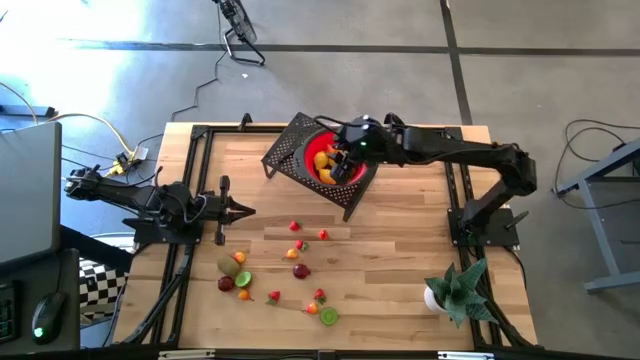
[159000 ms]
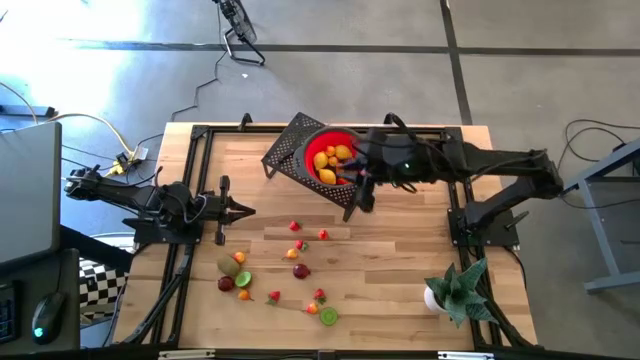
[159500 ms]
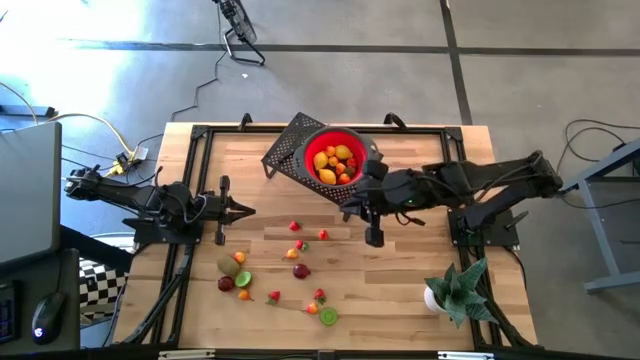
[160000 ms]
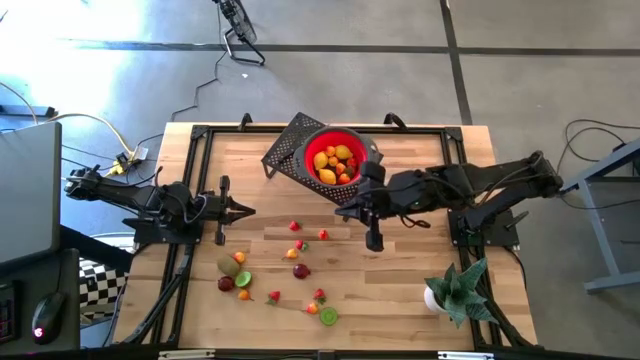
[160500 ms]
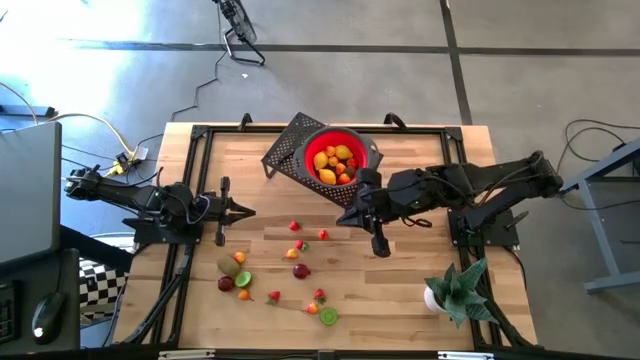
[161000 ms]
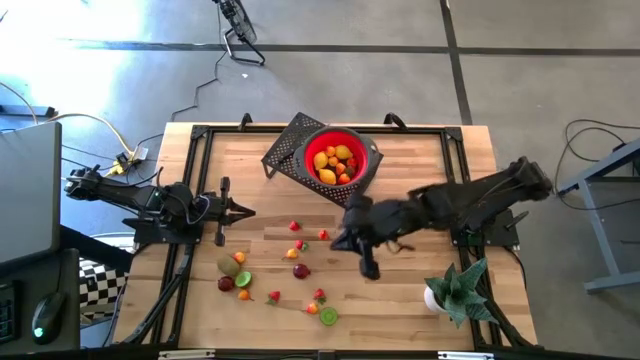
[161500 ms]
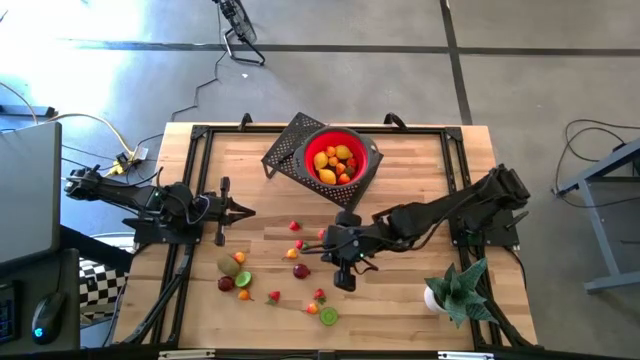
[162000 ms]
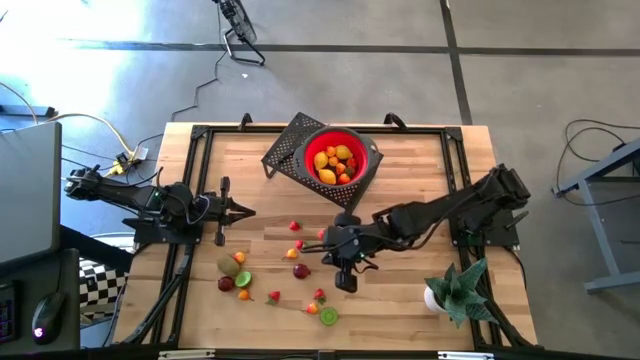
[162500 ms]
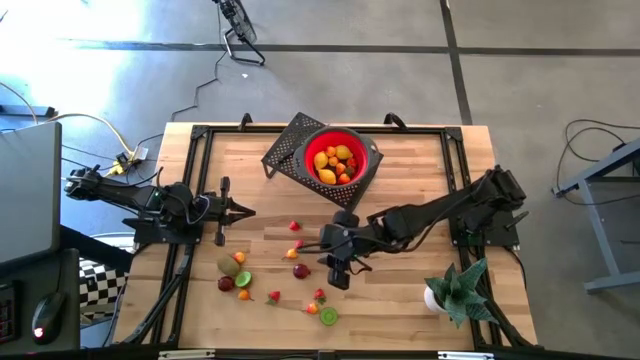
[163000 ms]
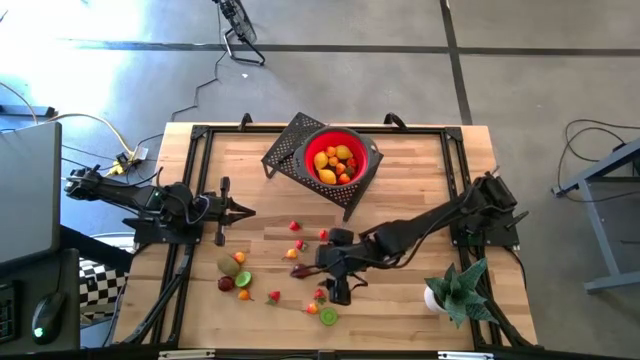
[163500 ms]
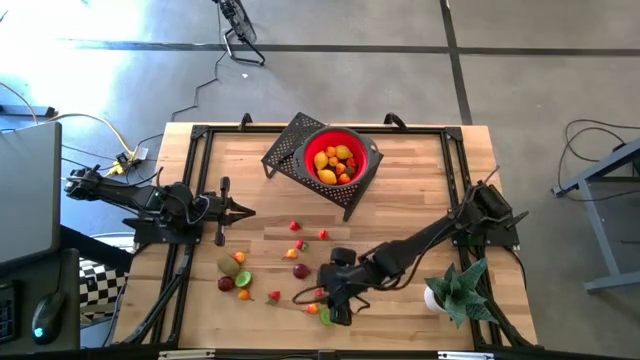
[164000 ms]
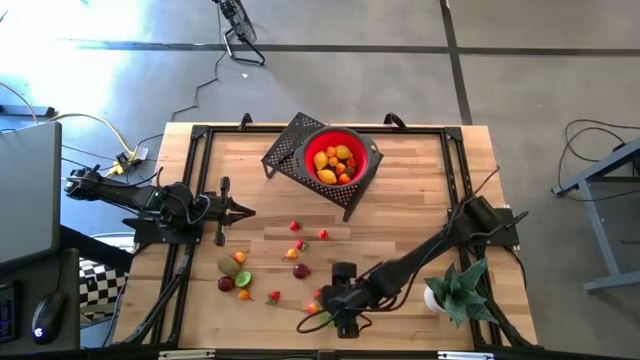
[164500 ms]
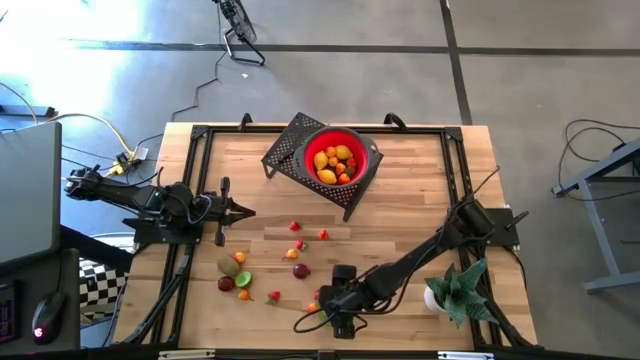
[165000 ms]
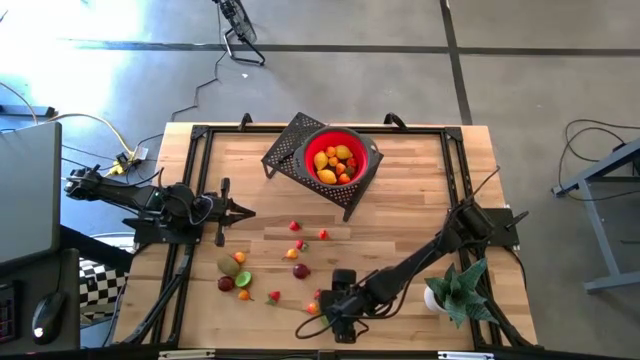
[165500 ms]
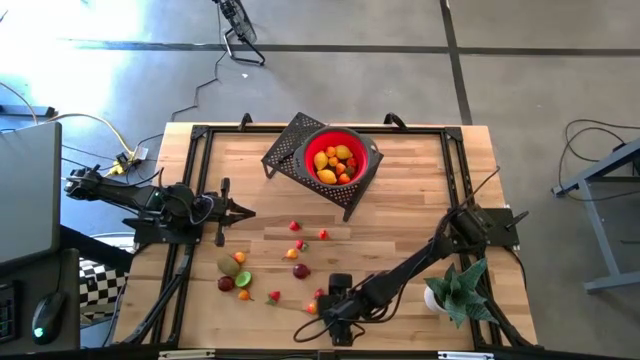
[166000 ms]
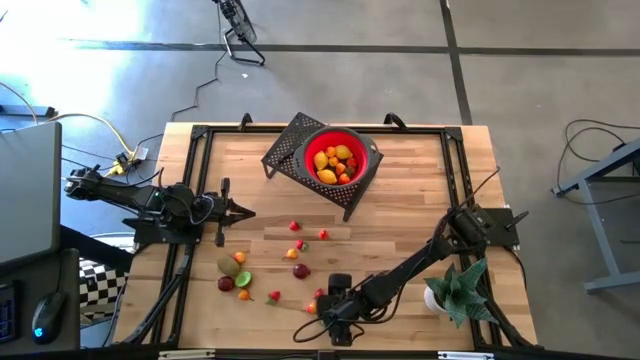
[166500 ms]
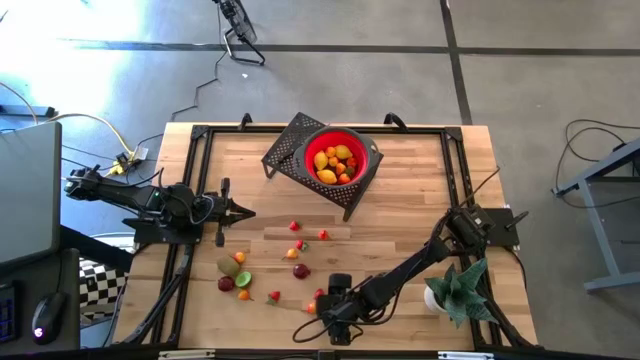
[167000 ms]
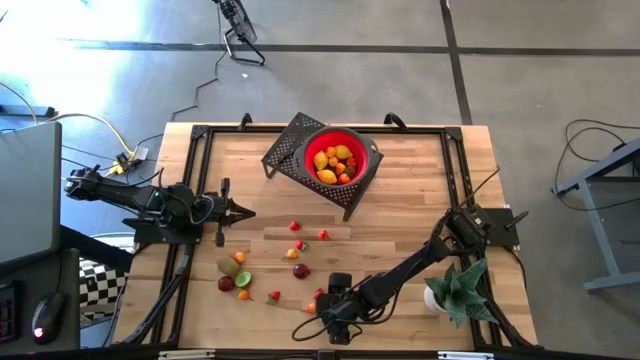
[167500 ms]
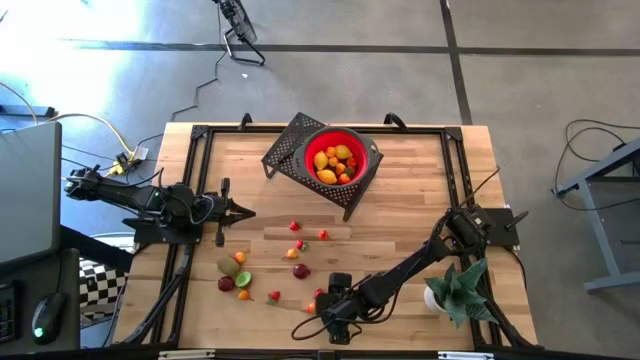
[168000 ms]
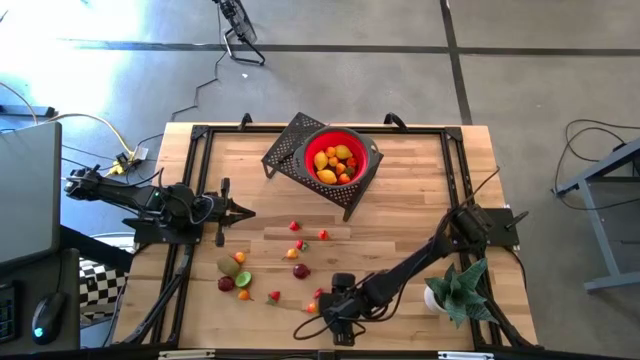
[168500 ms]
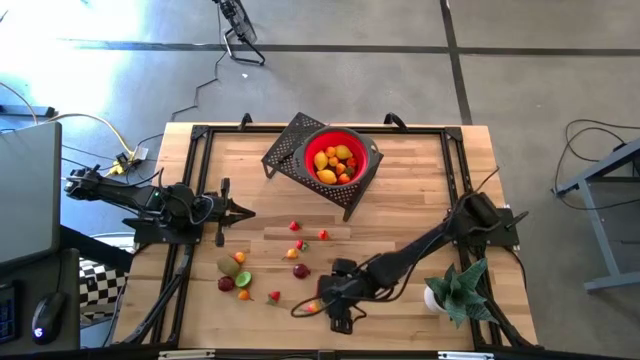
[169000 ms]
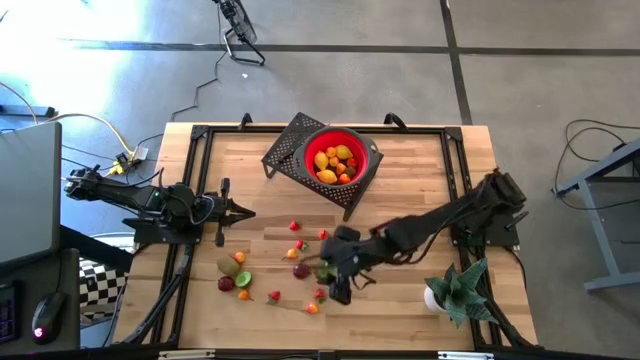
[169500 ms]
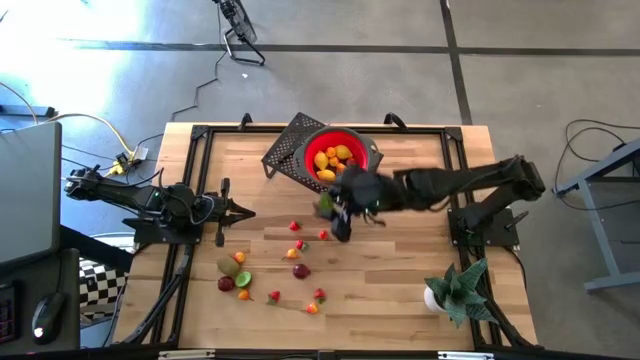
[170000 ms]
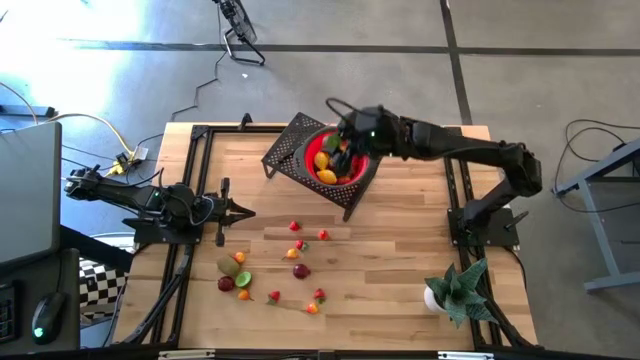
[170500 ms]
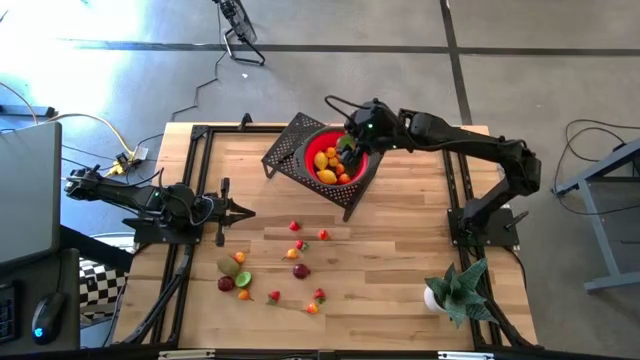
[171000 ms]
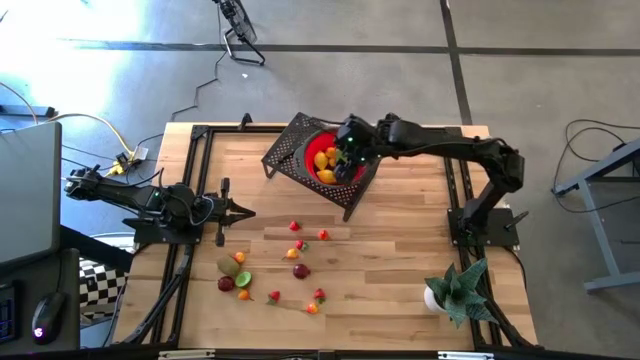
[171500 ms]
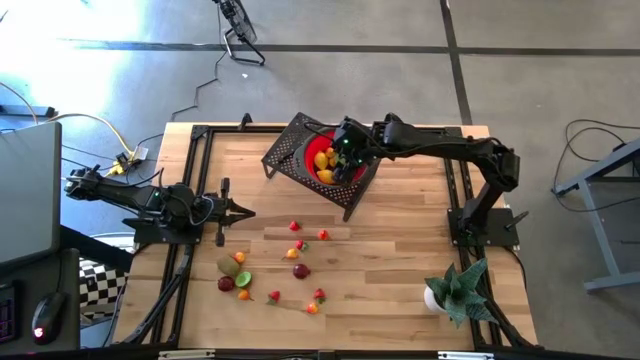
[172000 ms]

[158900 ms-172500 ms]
Task: Pick & Place Fruit
Put the sliced kiwi into the strainer bowl on the shelf

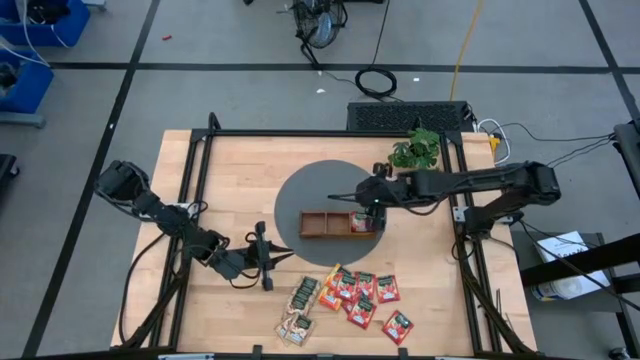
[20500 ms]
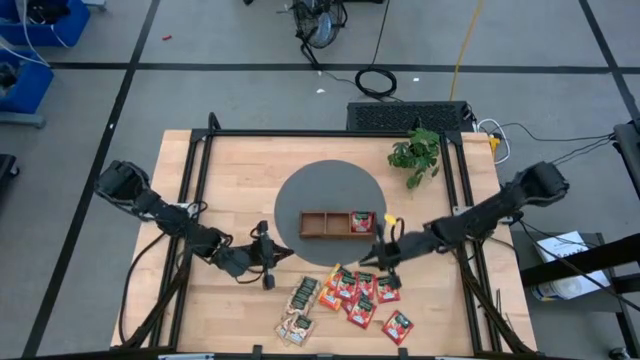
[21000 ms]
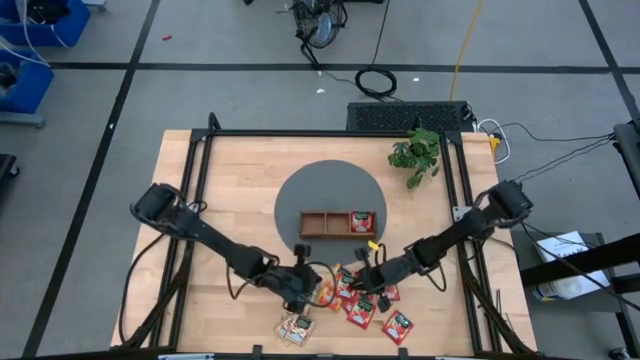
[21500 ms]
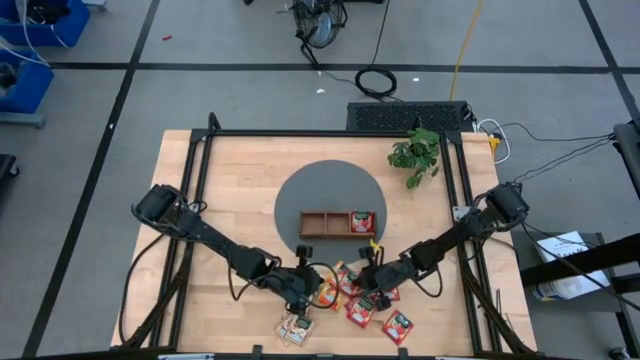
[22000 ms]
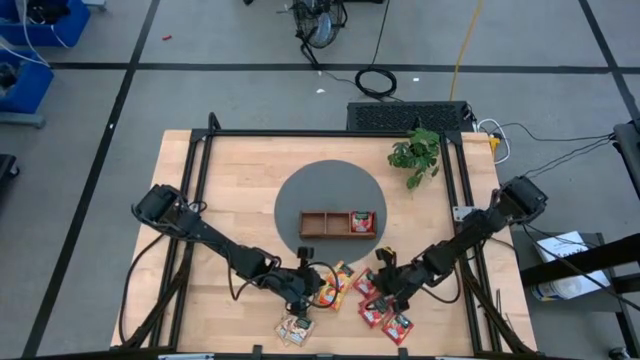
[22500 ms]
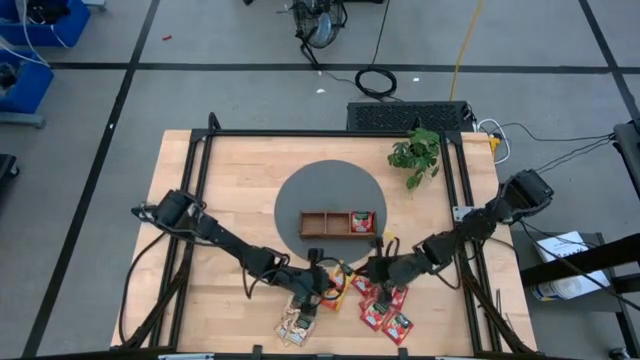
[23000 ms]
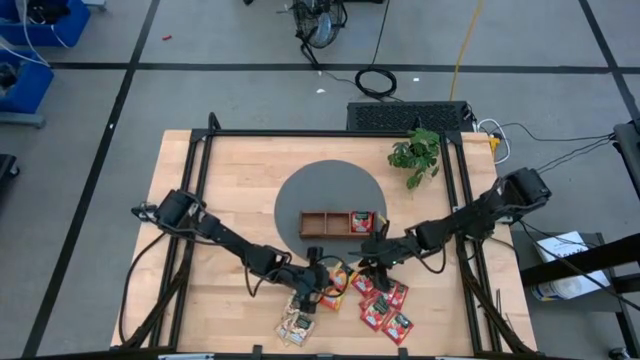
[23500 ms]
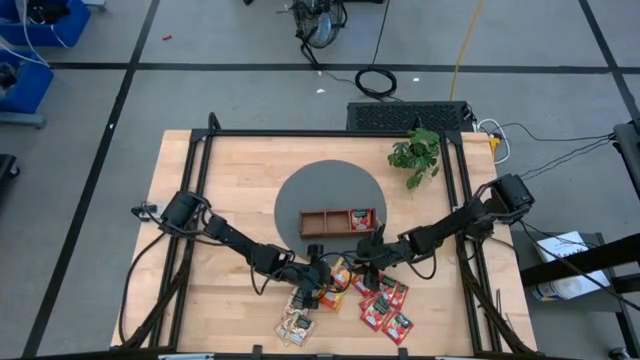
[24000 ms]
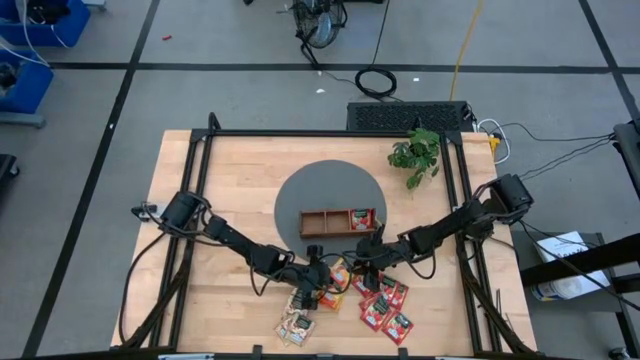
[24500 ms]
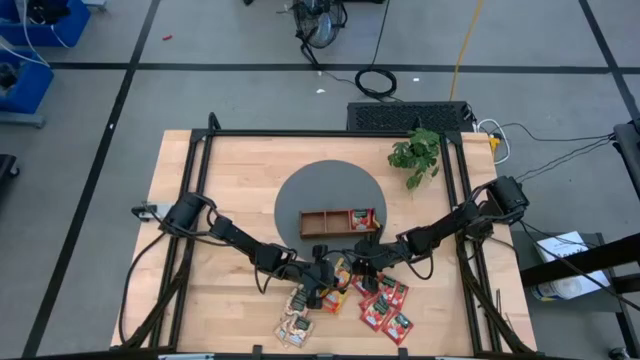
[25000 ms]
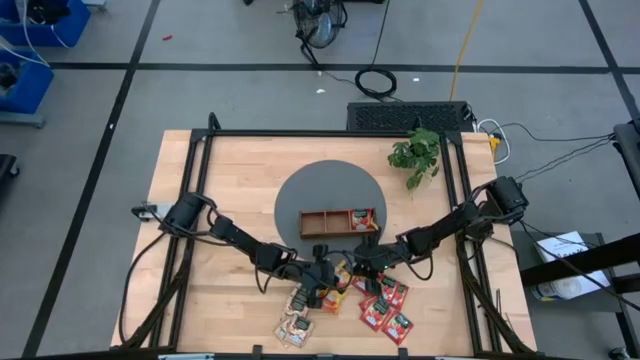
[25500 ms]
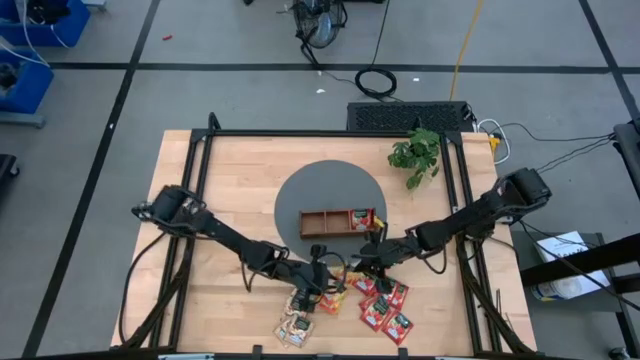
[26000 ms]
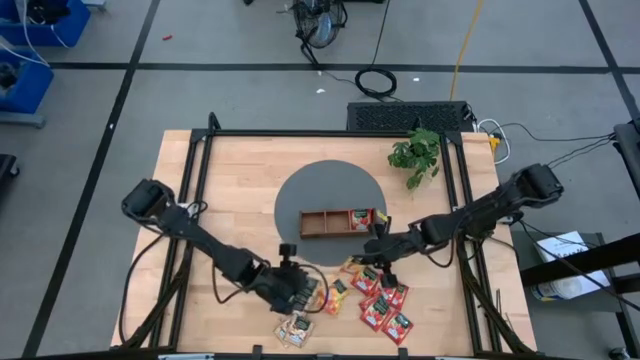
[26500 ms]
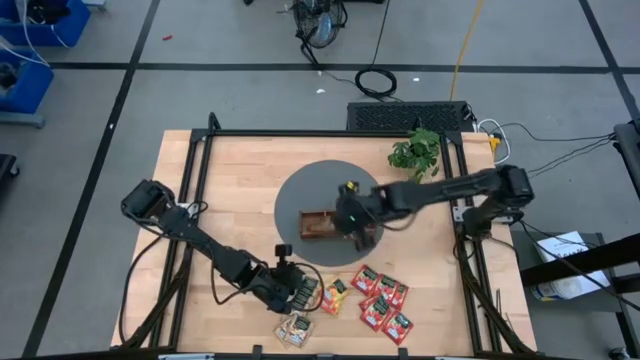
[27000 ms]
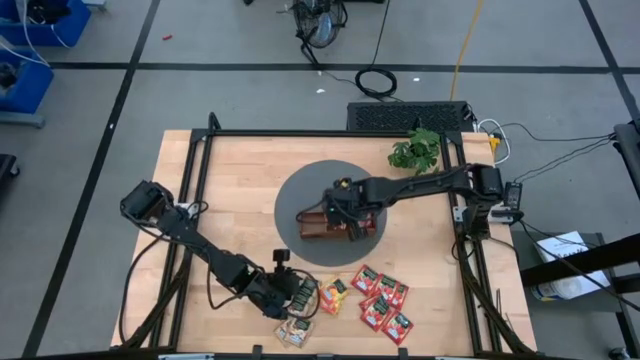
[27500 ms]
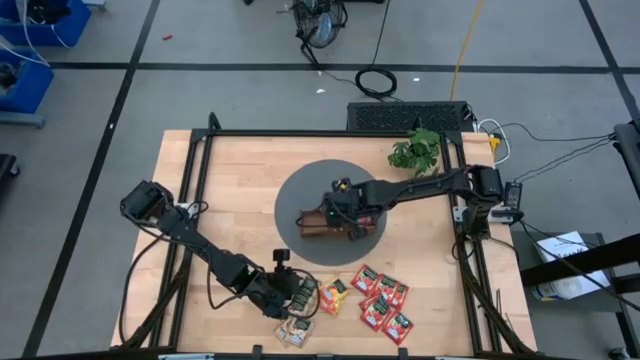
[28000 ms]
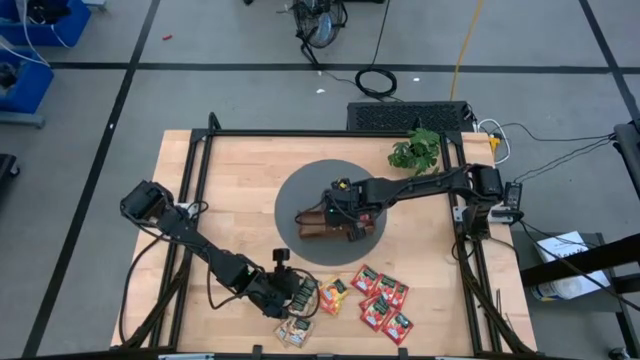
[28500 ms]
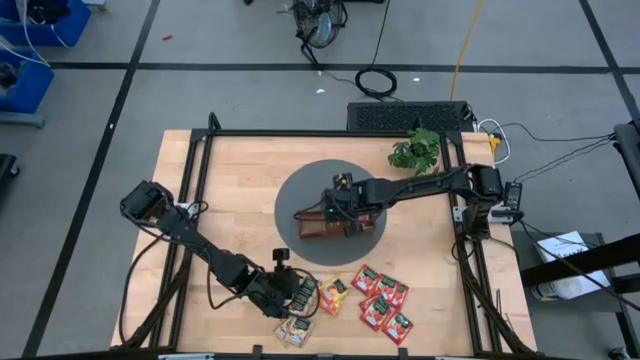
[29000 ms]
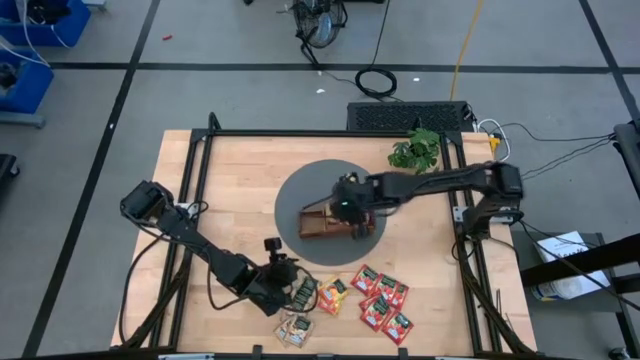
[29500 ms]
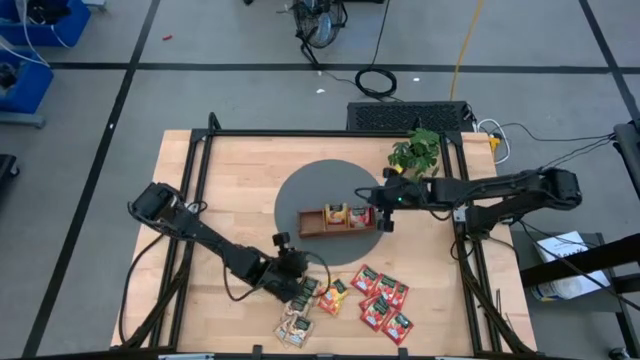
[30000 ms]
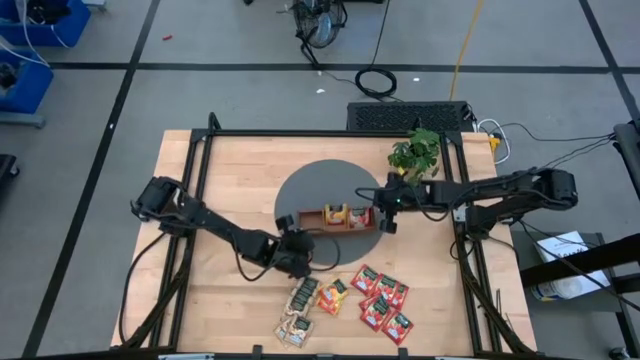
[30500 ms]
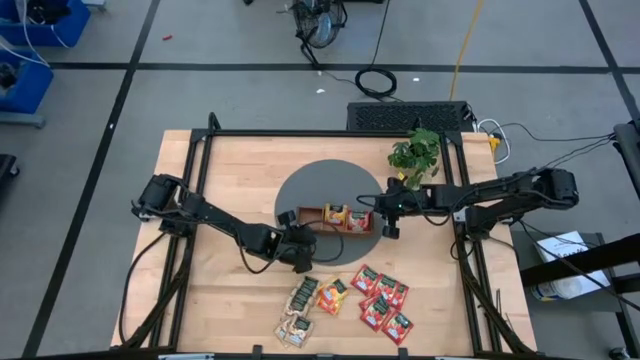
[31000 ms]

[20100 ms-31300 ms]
Task: Pick & Place Tea
Put the yellow tea bag into the middle section of the wooden organizer
